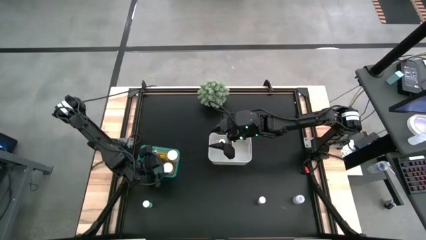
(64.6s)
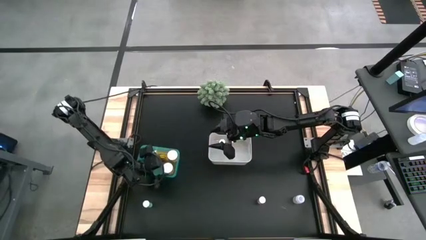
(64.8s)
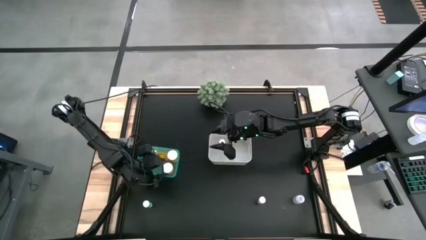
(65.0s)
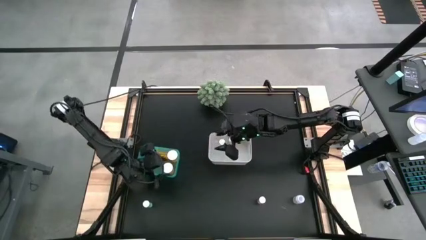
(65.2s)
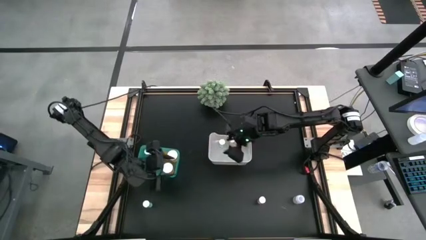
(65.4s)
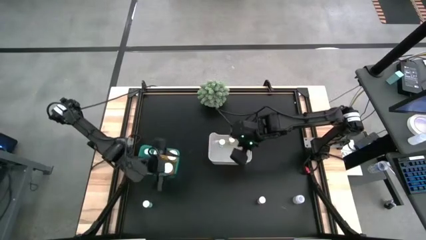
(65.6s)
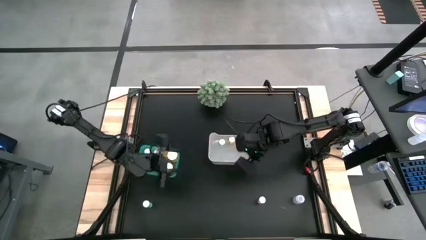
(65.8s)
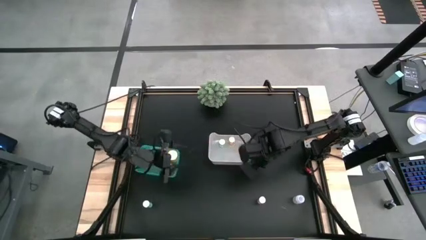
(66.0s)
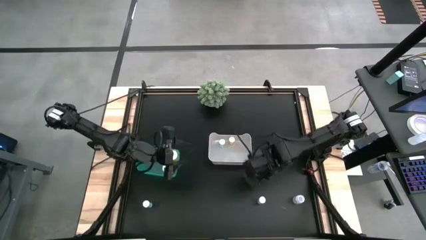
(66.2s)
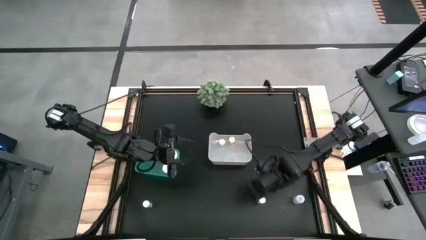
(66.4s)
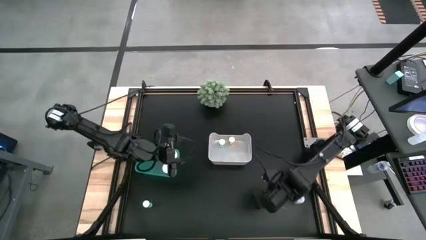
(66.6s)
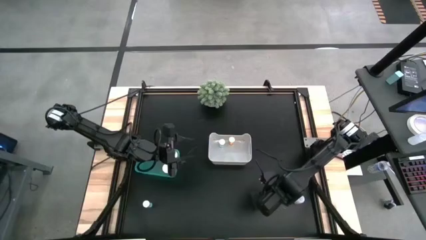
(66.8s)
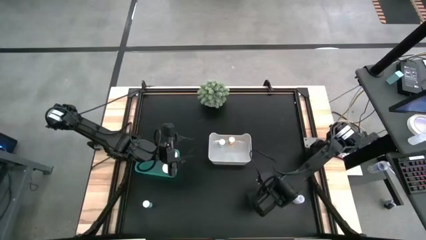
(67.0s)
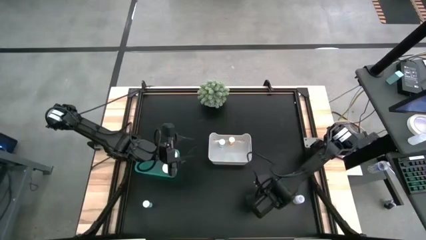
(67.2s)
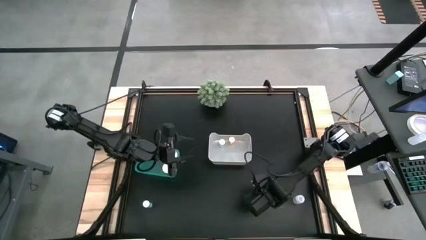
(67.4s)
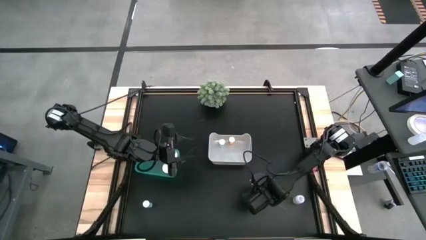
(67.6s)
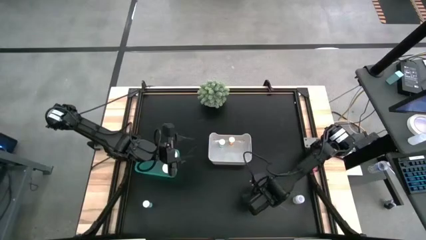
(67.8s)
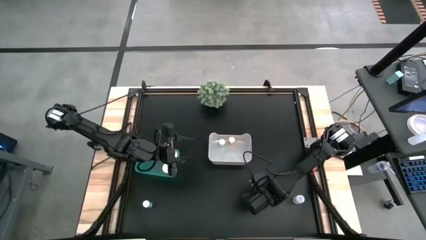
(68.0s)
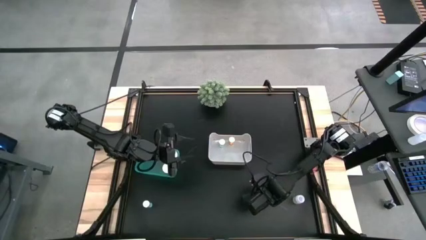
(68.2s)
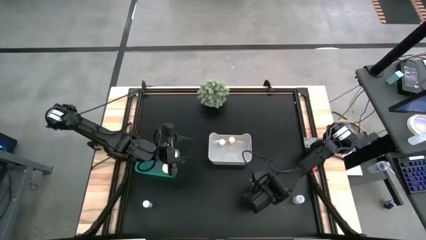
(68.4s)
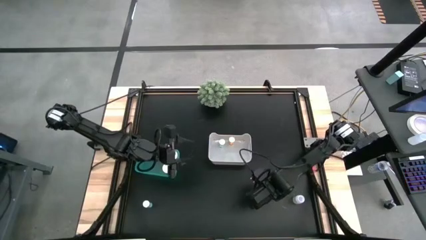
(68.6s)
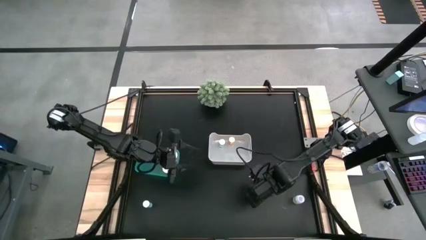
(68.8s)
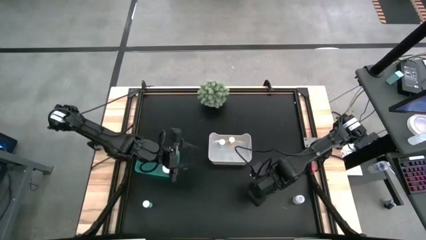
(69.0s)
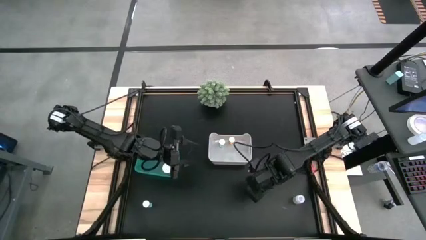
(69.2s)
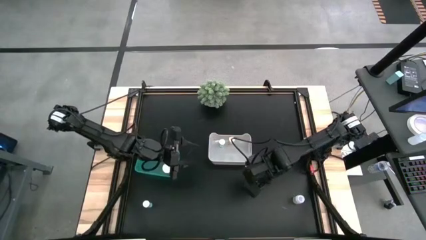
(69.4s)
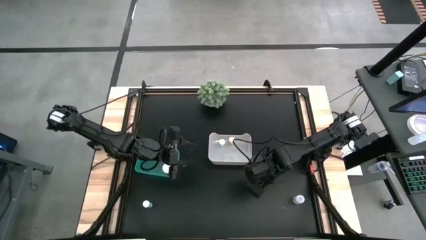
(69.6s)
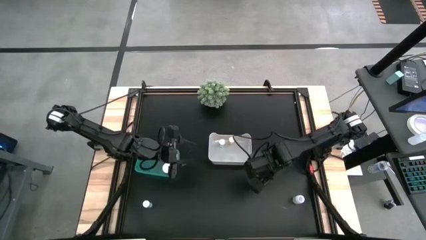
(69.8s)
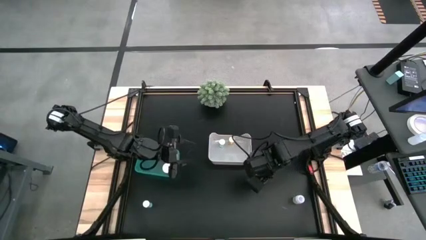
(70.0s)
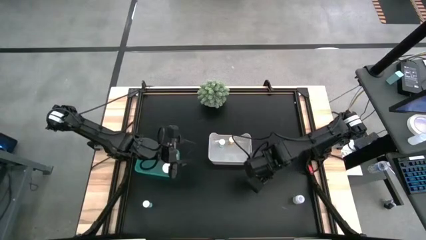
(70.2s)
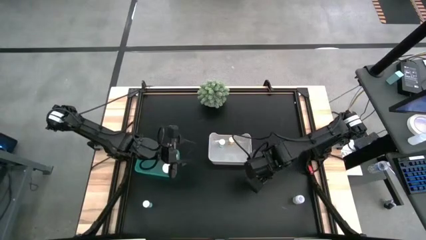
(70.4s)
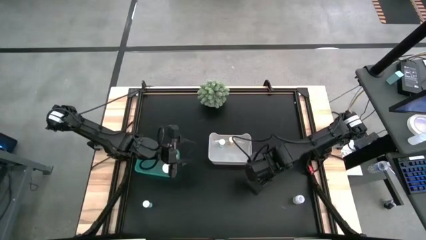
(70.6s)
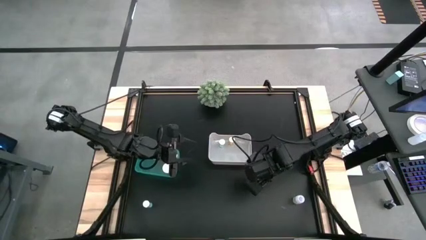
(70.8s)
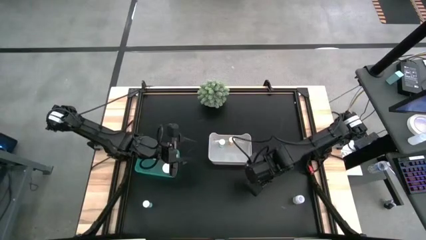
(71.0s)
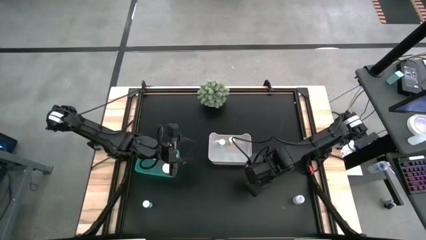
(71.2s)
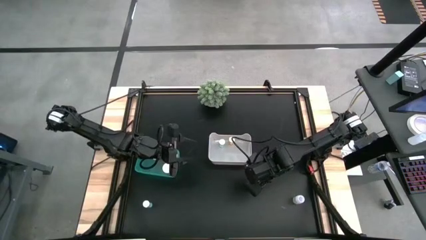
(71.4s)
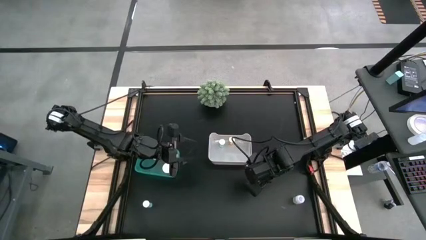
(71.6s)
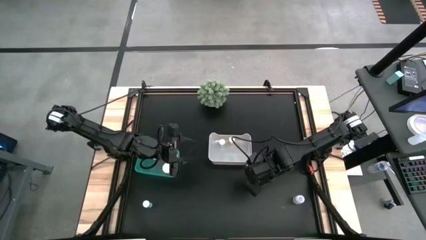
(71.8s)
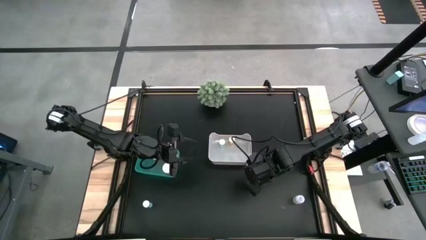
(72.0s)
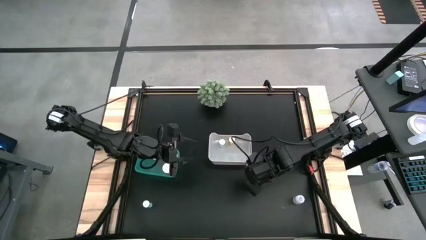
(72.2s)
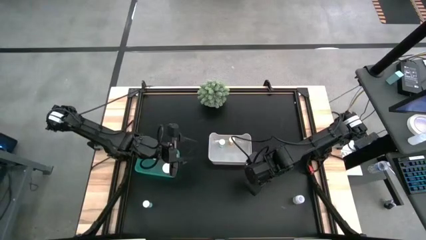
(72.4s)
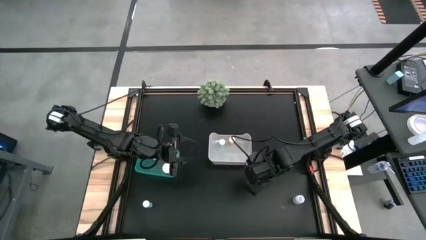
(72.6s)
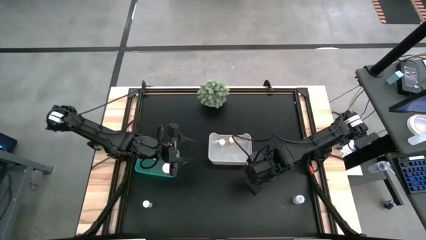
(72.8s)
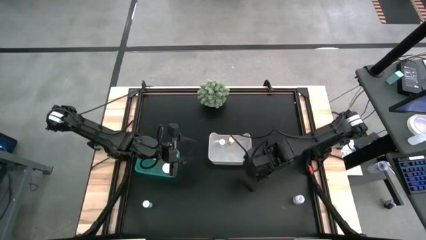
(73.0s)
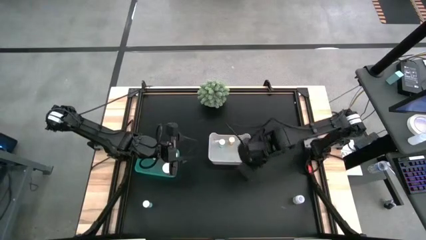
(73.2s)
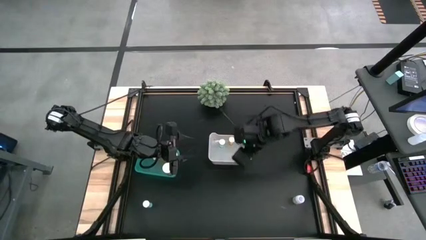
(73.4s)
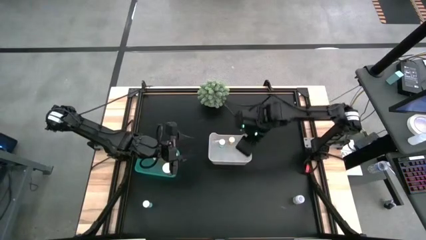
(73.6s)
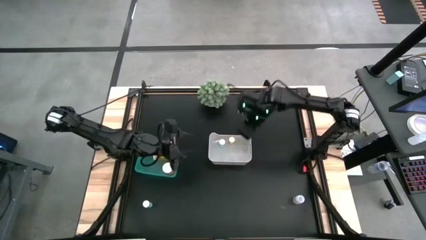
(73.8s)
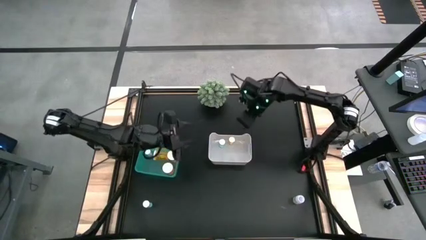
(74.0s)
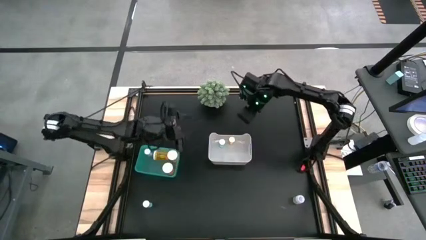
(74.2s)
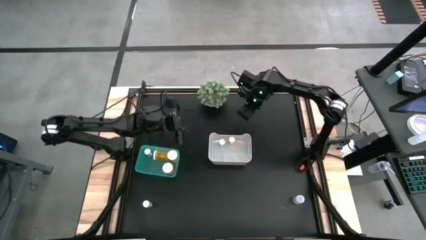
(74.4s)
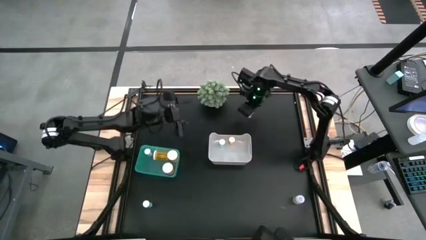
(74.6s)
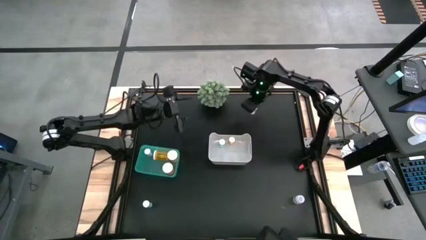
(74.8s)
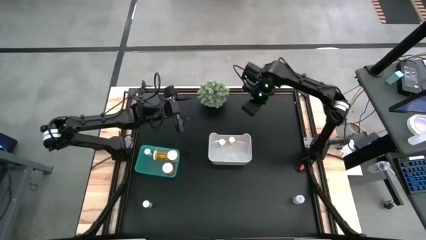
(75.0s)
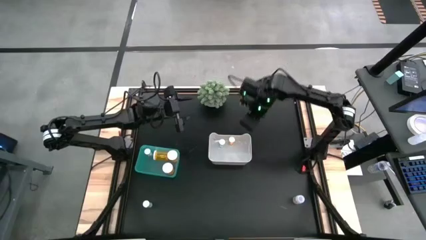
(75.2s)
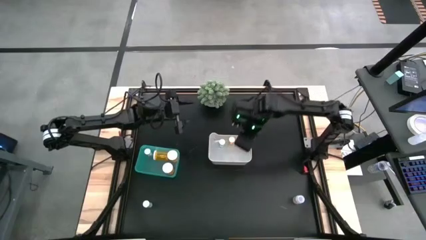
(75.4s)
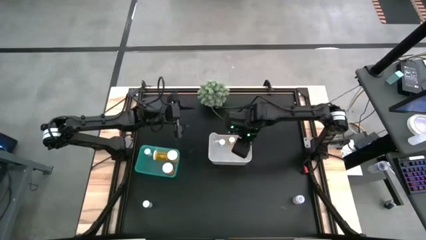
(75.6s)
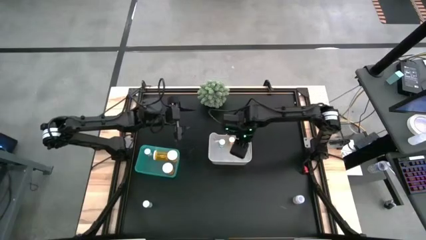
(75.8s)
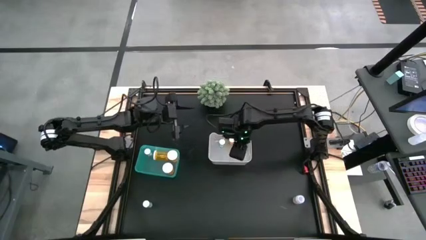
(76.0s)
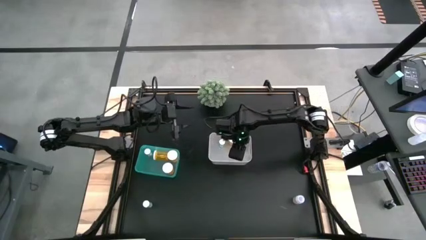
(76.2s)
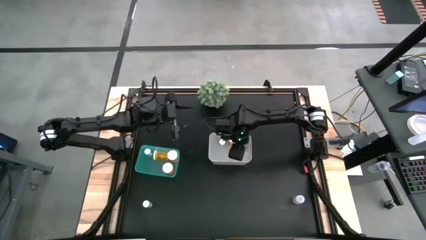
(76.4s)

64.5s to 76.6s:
Task: Pick and place medicine bottles into bin by pill shape (circle, oval)
Put the pink tablet bottle into the white bin

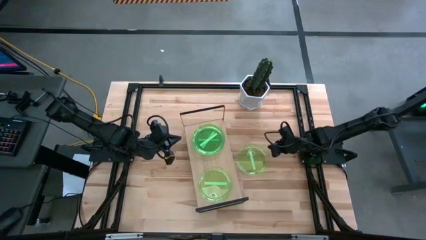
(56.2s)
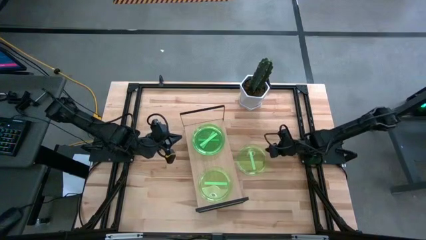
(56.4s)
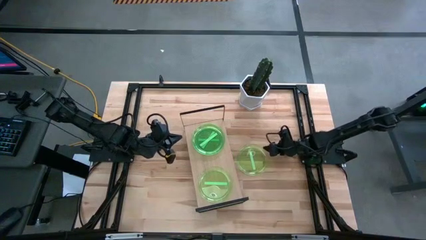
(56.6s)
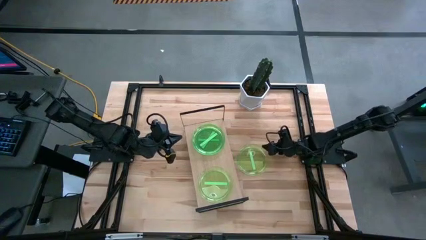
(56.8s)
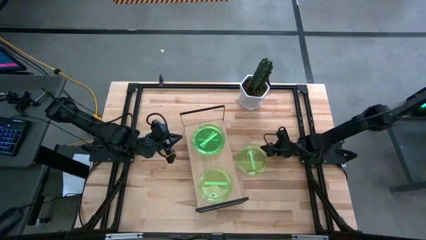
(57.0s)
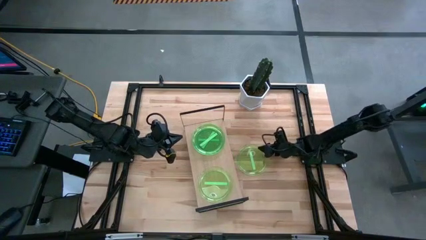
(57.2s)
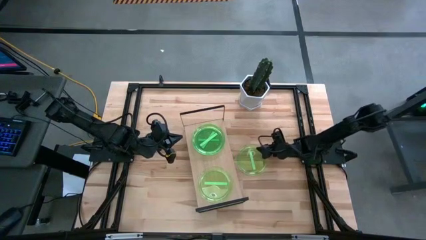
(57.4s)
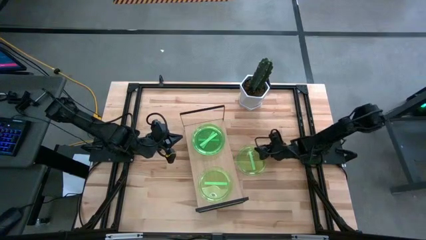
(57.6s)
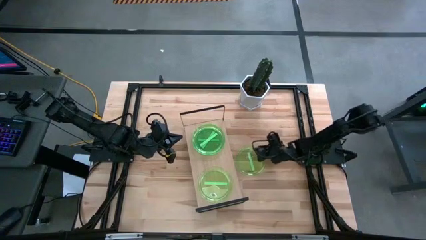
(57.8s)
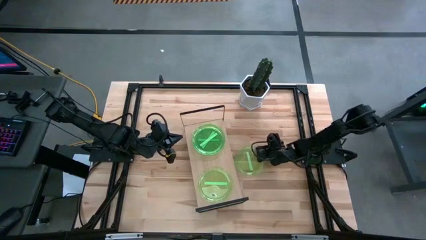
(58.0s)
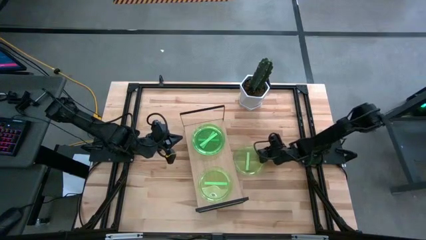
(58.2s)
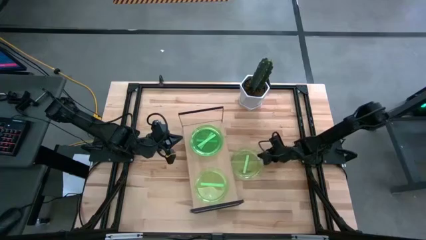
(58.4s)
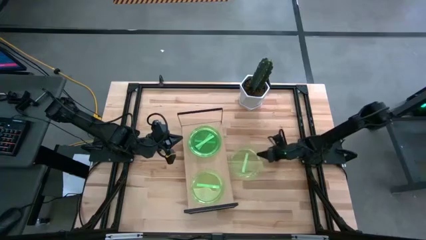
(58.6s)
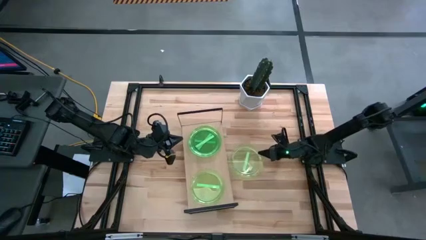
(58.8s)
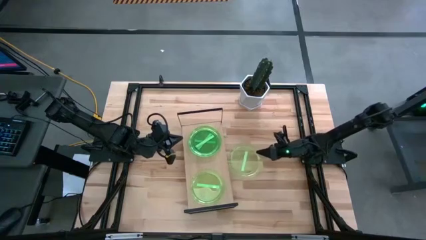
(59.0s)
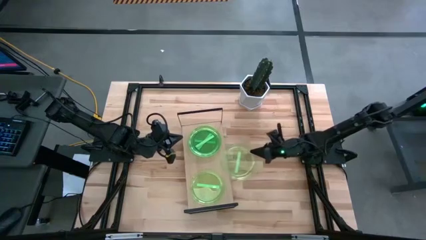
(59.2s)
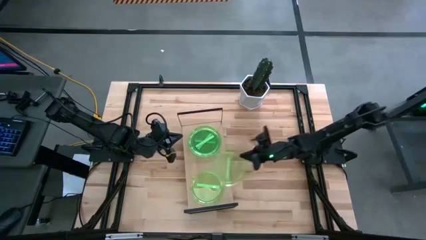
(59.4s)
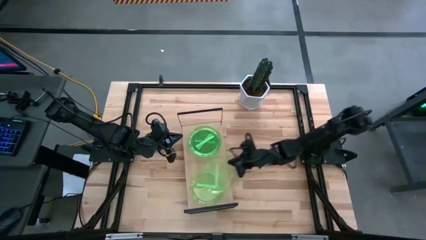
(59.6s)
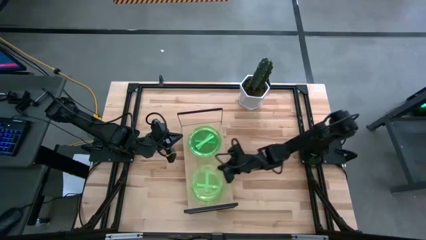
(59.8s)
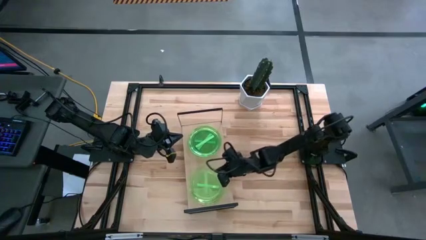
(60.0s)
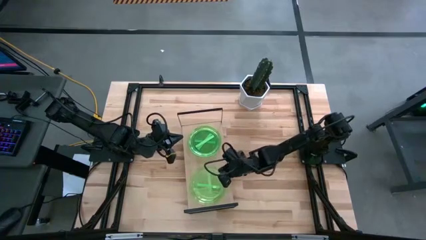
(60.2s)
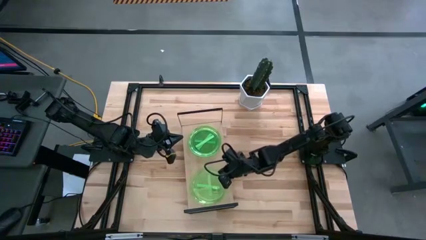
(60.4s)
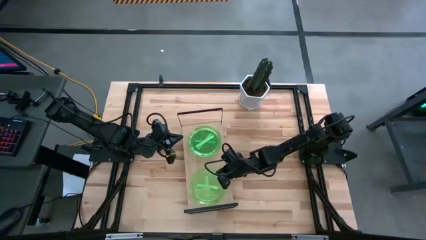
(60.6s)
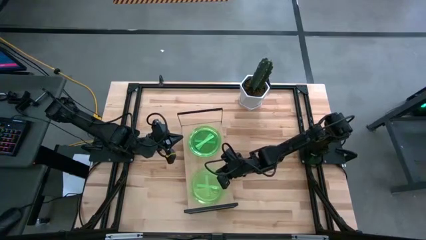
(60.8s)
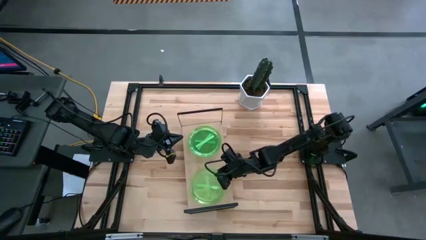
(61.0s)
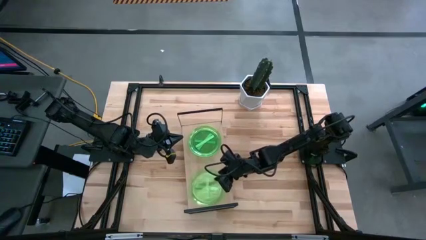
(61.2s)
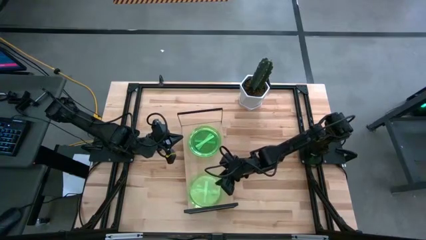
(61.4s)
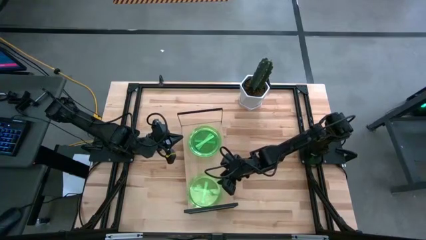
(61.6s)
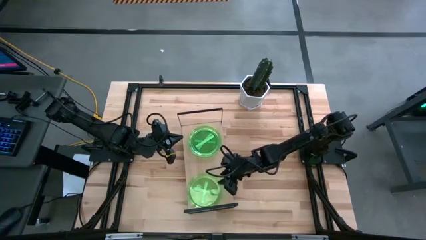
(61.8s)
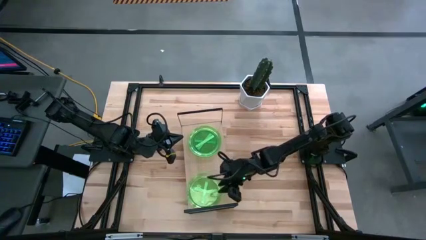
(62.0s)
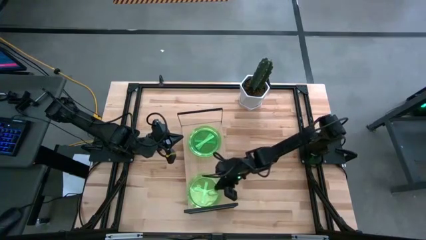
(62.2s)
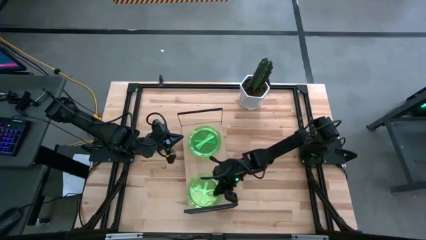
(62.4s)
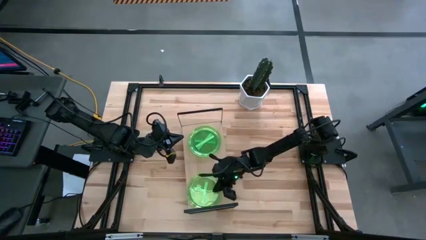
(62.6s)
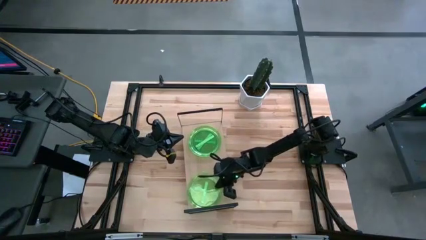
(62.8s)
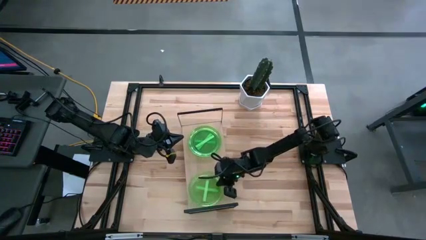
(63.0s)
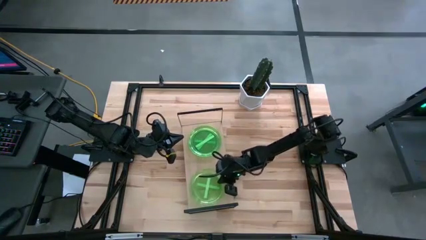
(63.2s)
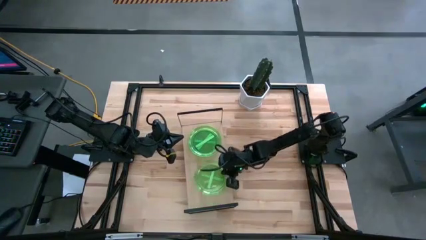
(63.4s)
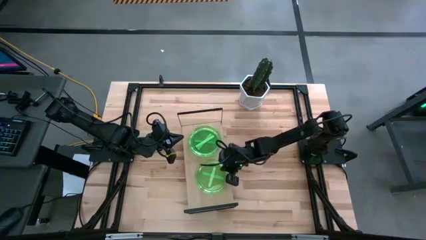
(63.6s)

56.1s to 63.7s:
Task: Place and stack plates onto a shelf
Stack the green plate on top of the bottom green plate on the shelf
